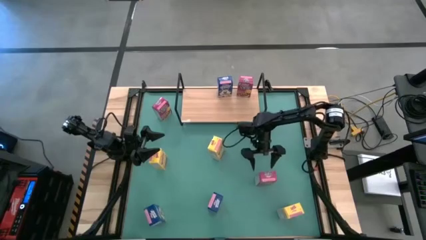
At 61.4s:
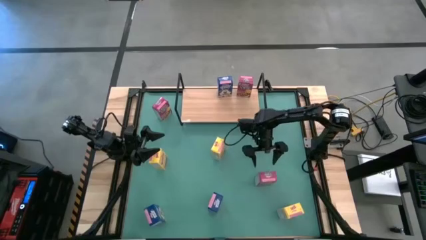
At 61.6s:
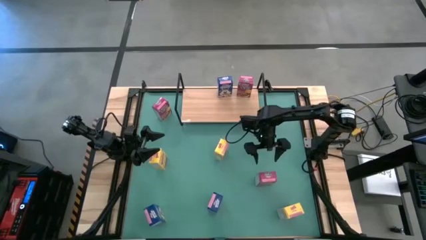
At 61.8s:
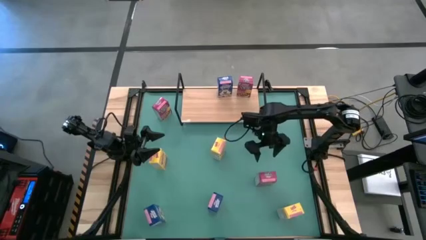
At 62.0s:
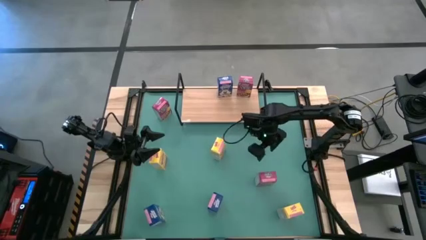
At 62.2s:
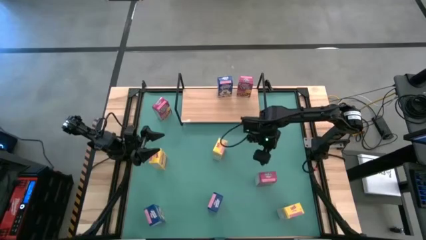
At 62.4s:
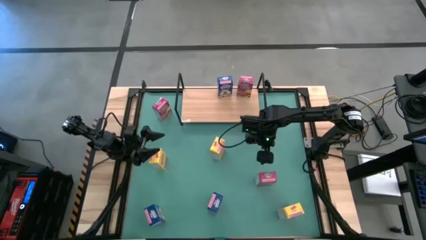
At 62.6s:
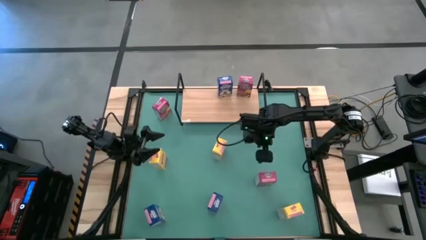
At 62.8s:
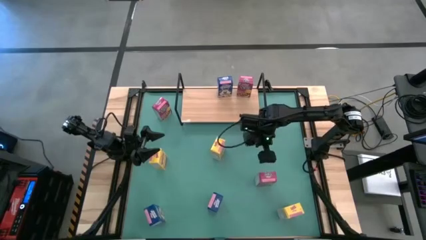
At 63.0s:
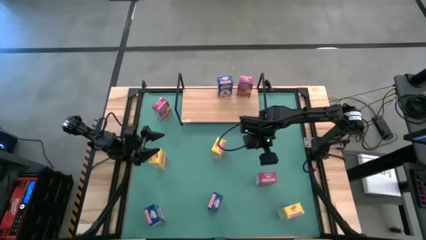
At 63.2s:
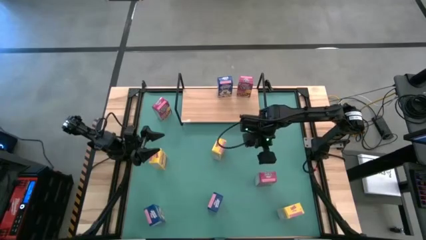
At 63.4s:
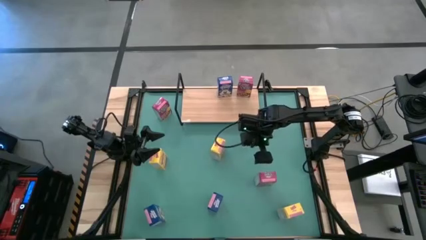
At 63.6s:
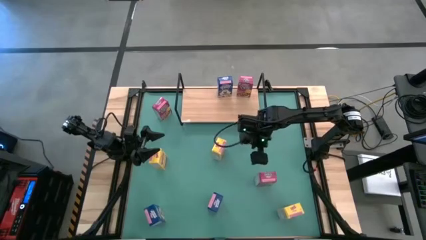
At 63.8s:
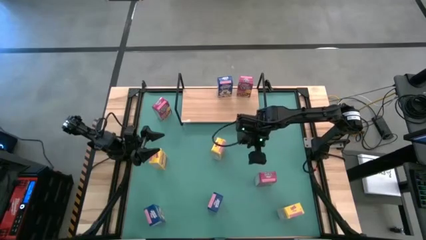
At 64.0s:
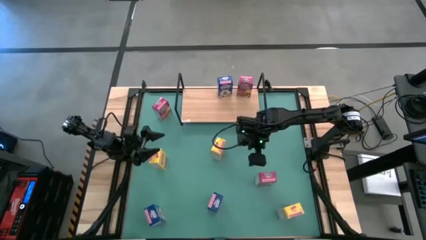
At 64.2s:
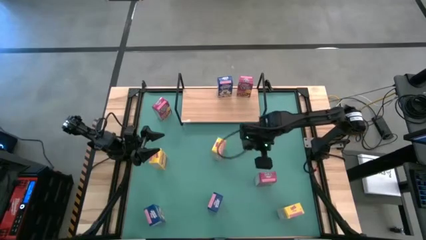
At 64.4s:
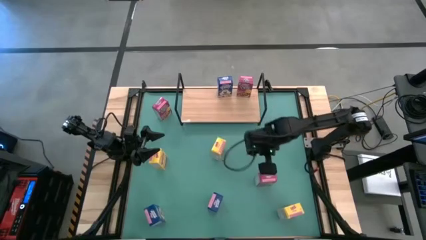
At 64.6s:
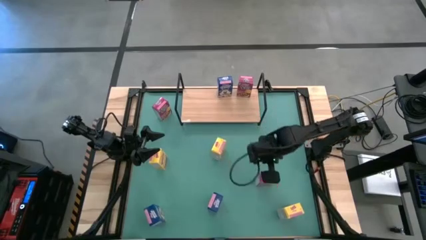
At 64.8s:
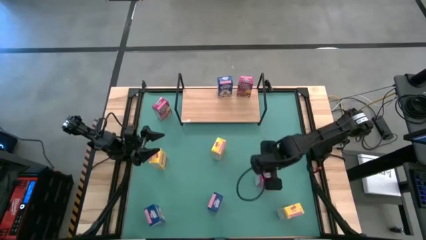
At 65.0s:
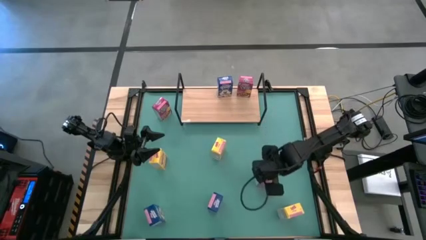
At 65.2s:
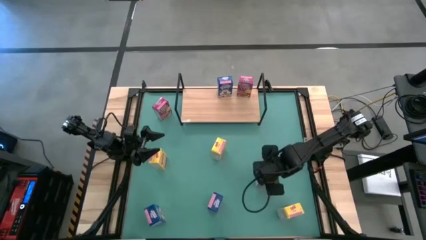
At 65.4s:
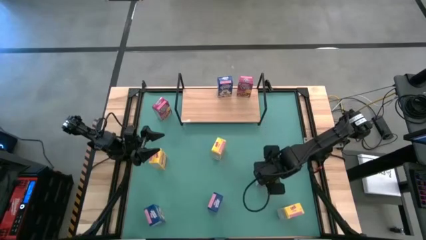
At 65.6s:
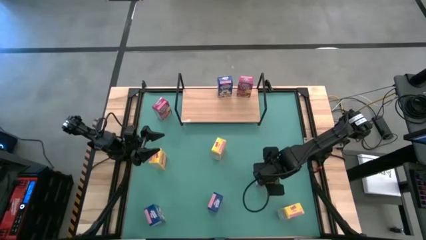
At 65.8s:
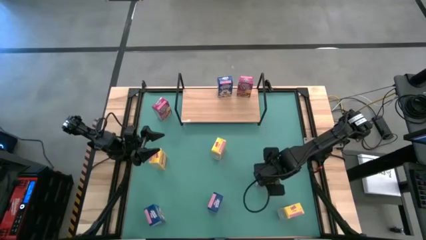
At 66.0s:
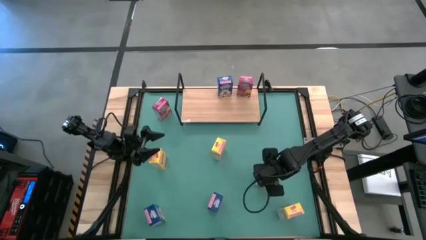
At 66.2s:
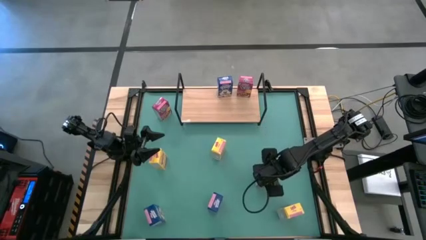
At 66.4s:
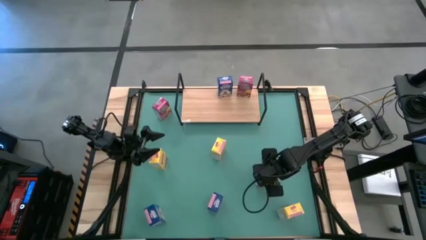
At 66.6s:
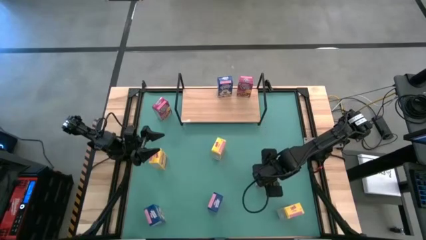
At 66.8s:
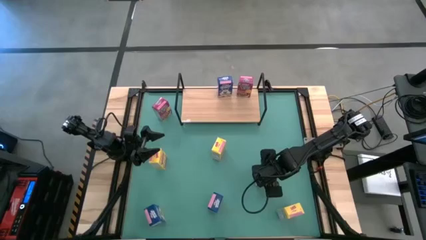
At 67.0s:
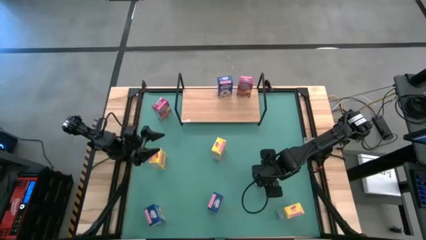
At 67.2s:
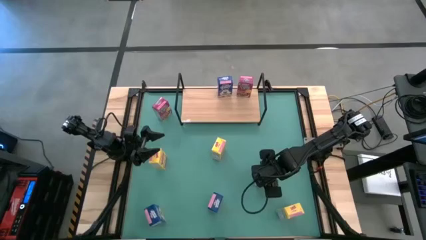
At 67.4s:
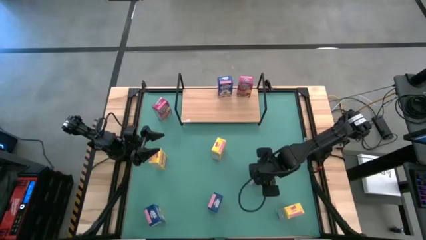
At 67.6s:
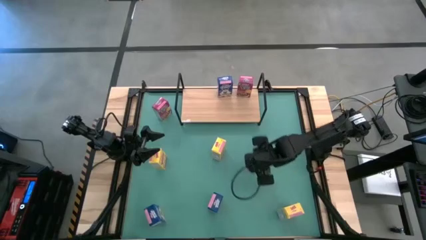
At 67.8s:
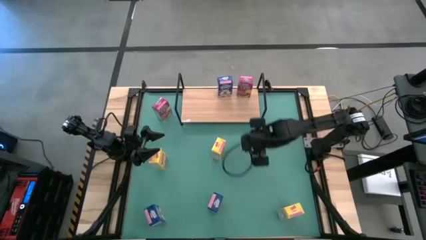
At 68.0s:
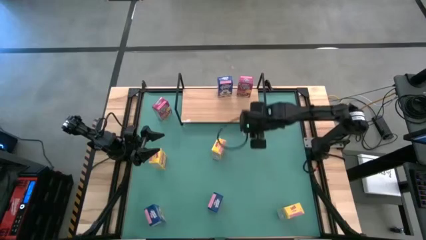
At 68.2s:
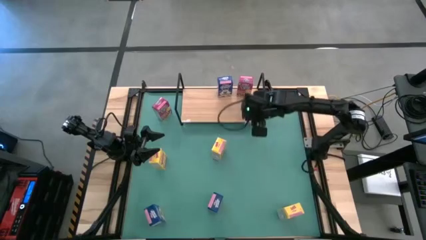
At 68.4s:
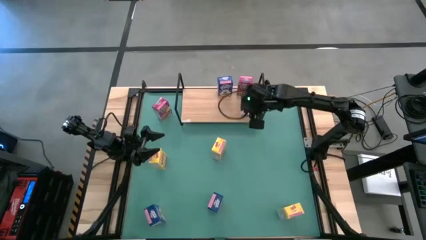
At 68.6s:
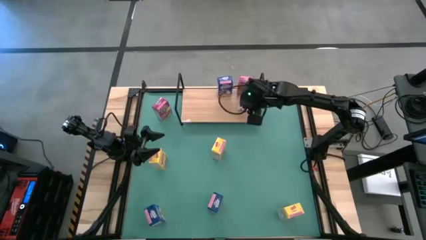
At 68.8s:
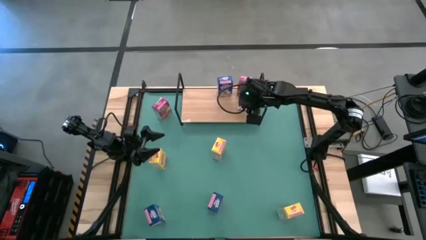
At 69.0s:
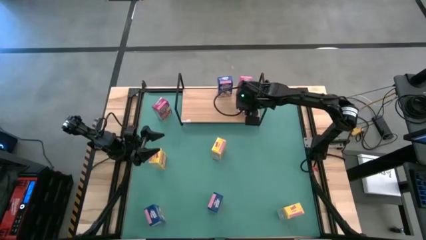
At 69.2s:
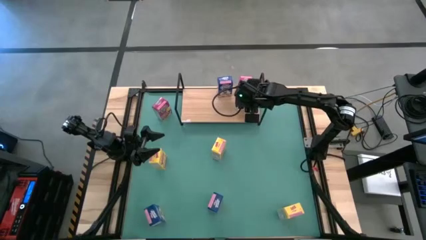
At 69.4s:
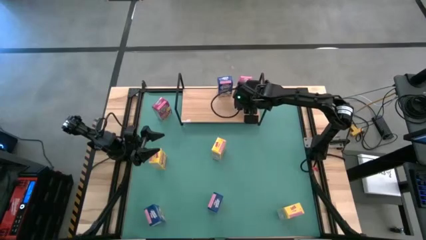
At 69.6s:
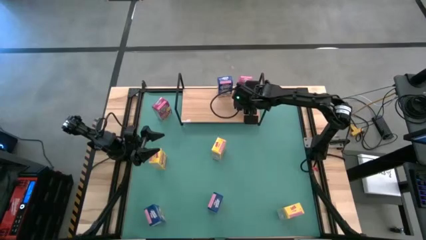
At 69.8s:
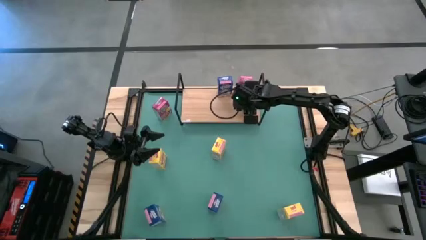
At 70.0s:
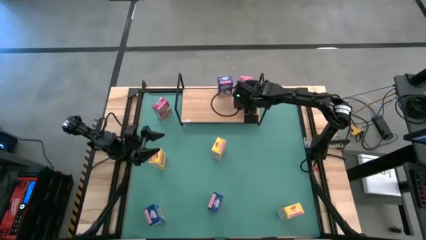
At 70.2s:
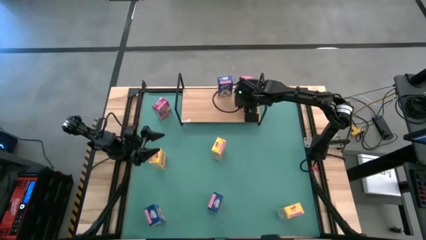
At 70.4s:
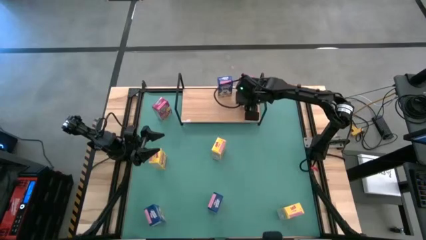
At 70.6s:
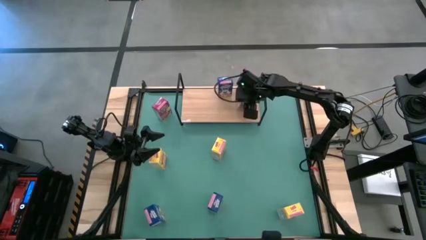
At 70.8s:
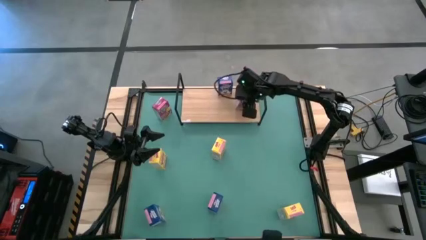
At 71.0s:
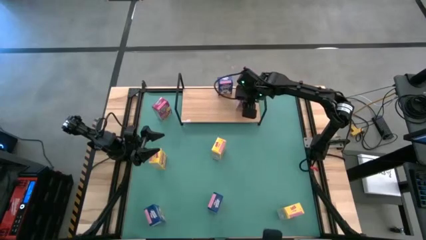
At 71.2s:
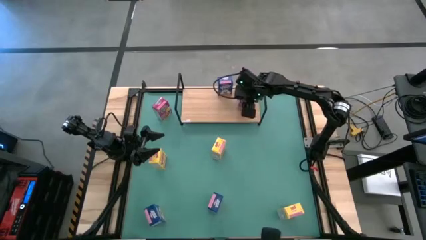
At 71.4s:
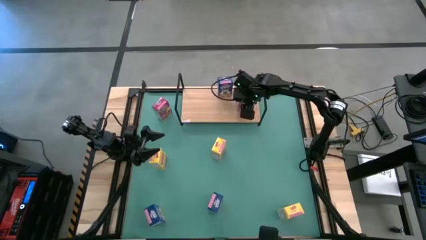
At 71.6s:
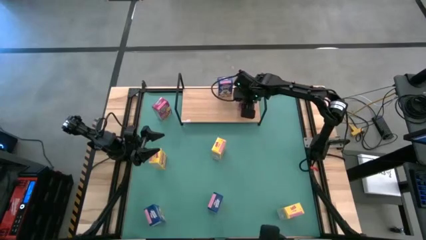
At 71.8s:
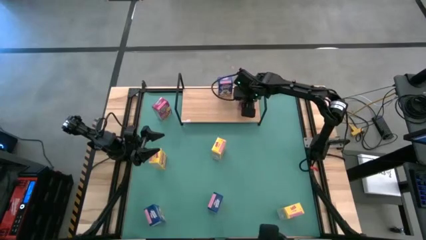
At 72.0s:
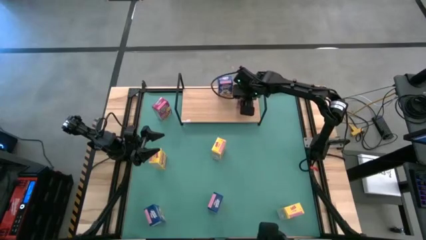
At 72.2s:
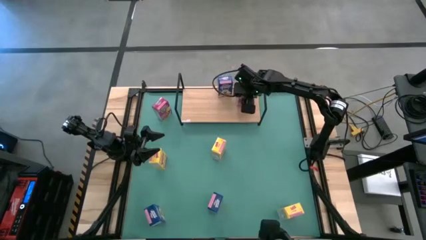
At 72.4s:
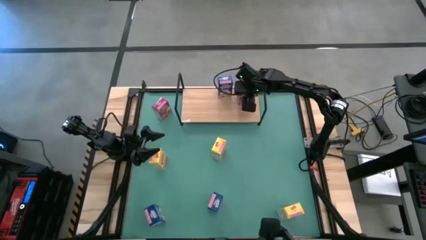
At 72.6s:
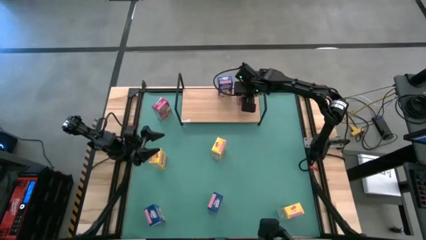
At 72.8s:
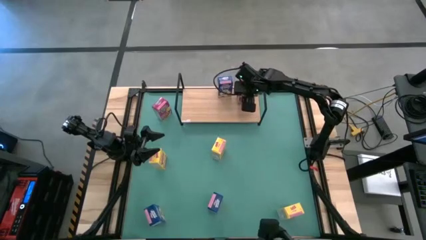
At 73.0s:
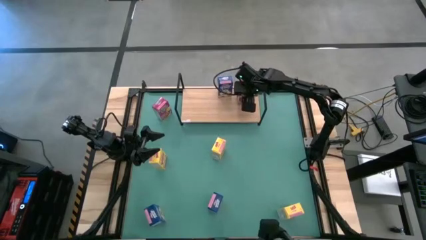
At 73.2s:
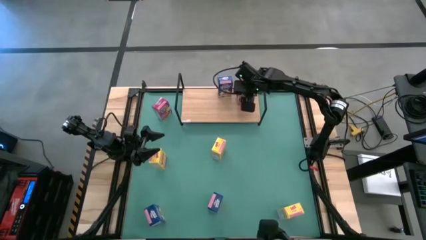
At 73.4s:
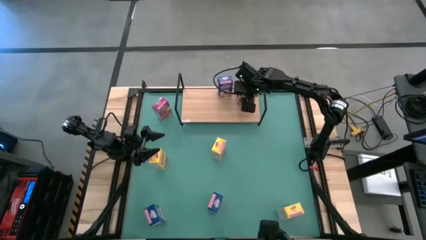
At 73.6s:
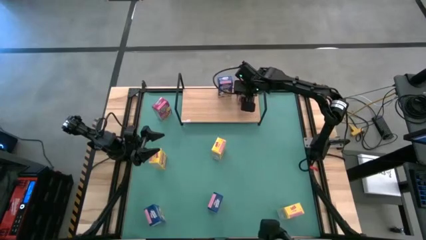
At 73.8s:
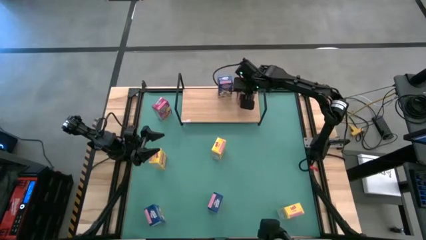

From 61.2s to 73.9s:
Task: Stack cereal on shelf
Put the right pink cereal box on the shelf aligned with the other pink cereal box

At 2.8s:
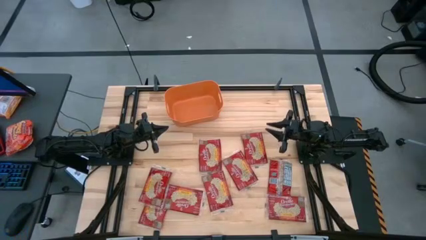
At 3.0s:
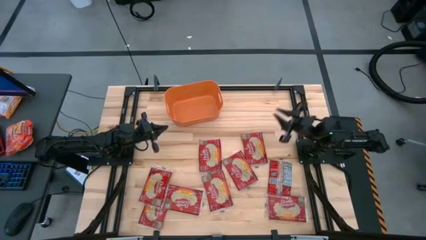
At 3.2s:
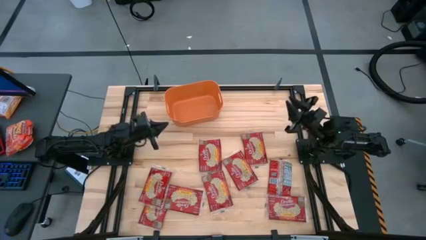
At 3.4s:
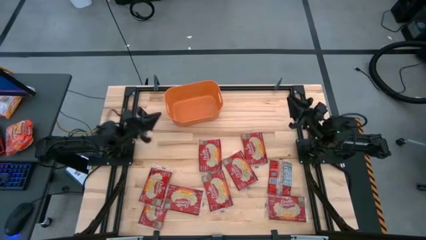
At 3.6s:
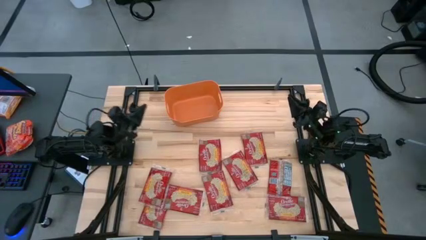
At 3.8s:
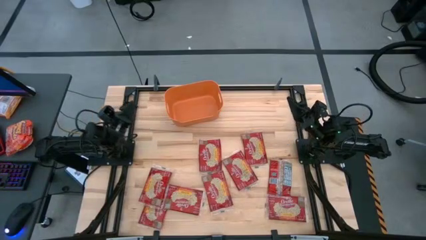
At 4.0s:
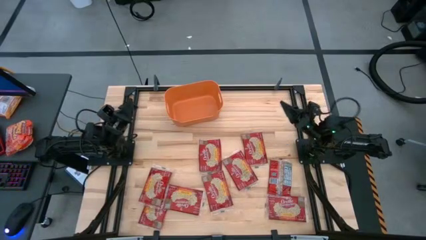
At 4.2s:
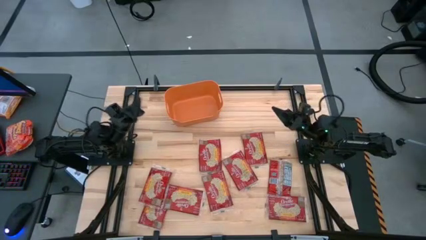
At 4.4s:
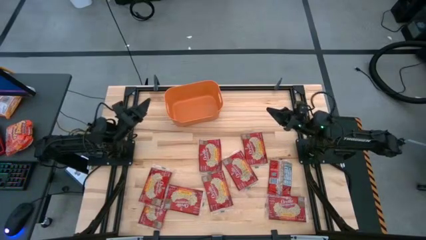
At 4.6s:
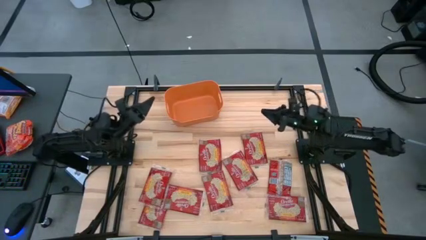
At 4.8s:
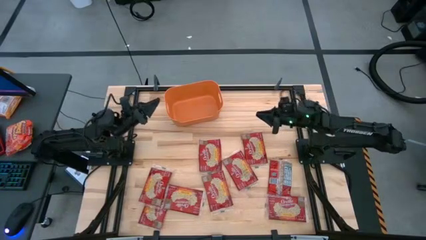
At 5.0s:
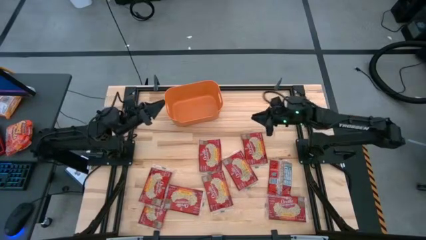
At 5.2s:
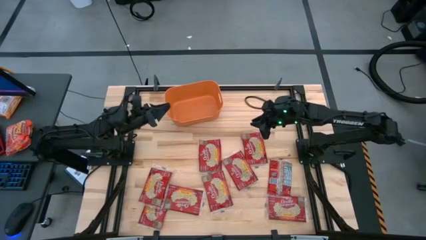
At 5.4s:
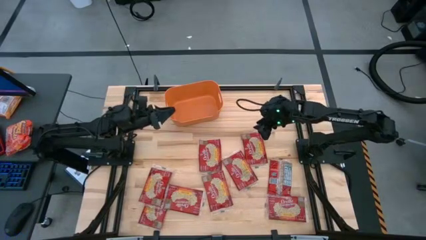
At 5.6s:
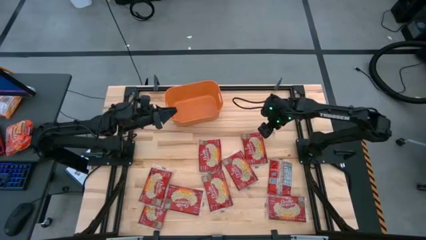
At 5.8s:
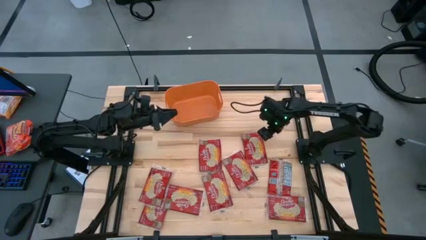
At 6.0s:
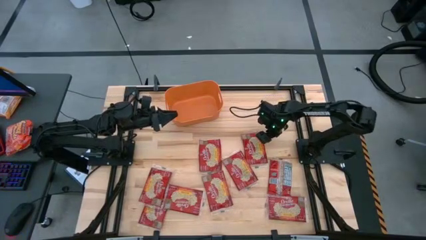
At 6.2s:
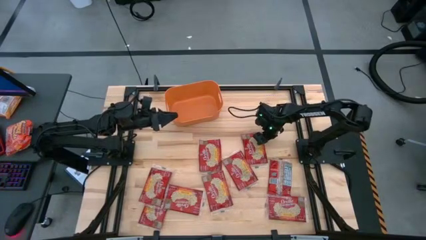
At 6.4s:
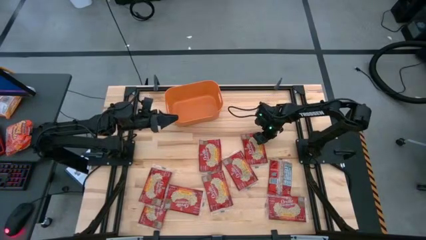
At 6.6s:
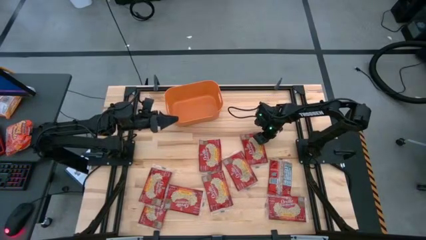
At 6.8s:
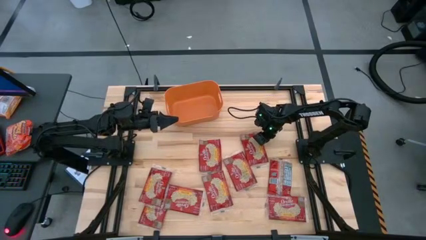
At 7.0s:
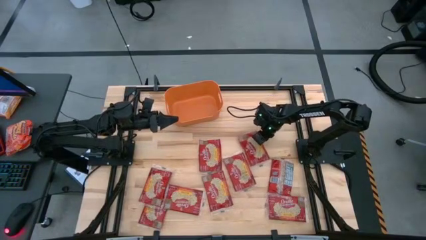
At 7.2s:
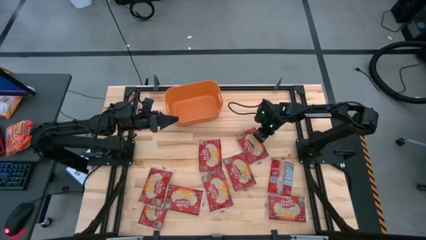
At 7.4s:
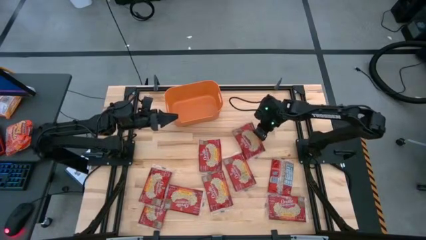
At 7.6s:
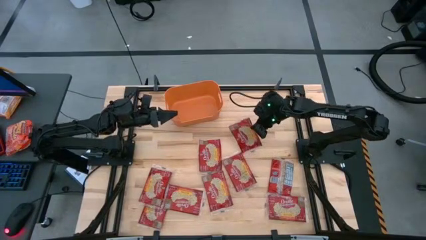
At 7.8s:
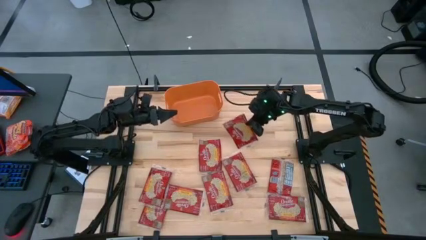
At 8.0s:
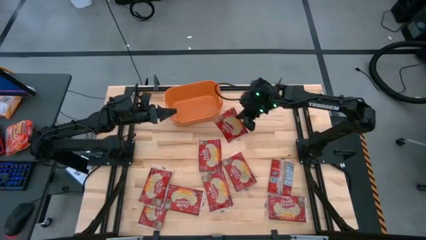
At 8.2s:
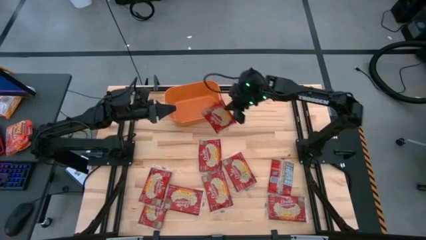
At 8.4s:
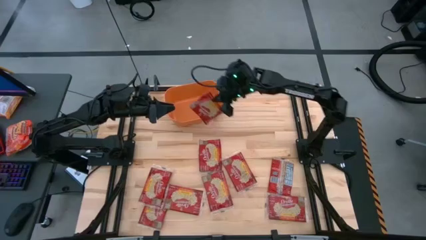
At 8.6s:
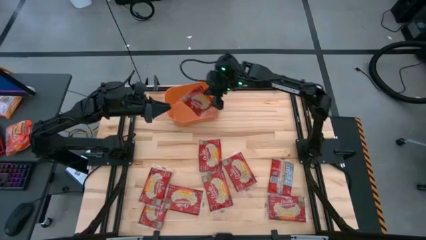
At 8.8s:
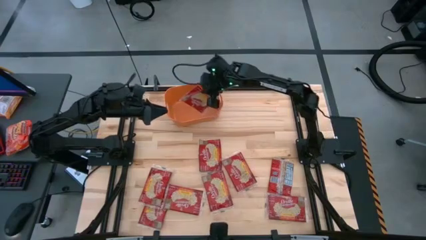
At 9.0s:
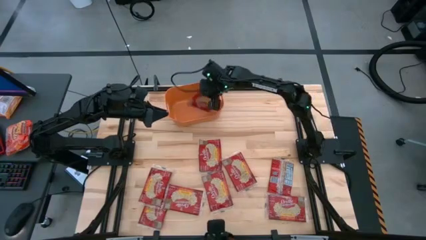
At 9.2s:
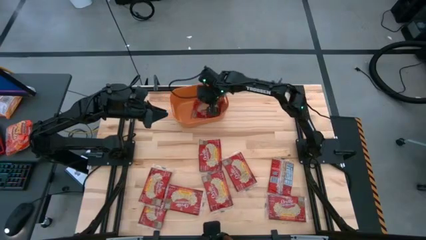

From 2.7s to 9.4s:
Task: Sort popcorn bags into baskets
Put the red popcorn bag into the orange bin
